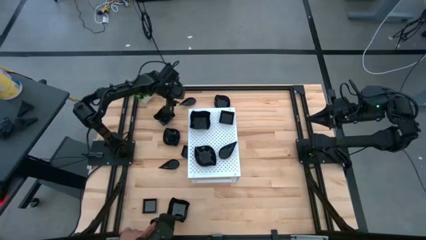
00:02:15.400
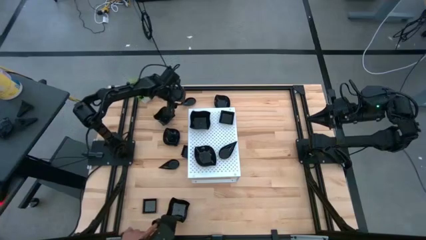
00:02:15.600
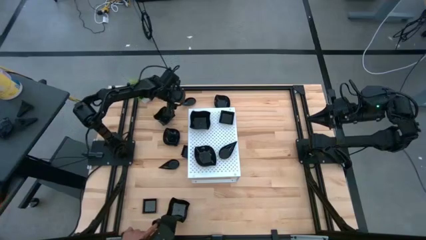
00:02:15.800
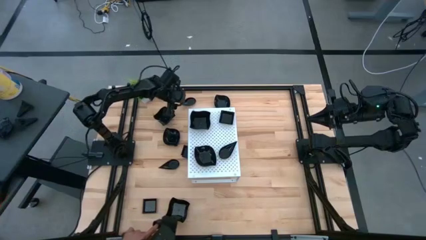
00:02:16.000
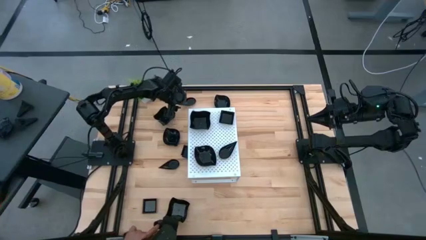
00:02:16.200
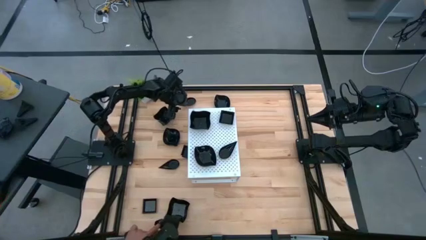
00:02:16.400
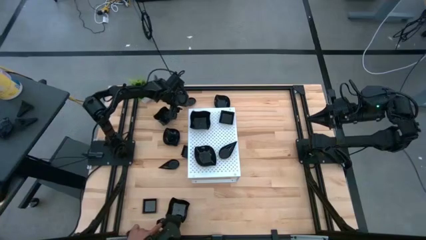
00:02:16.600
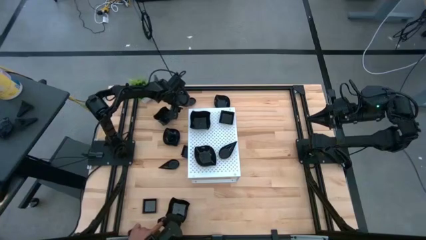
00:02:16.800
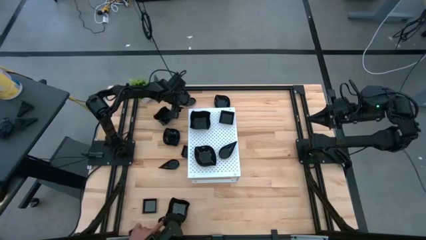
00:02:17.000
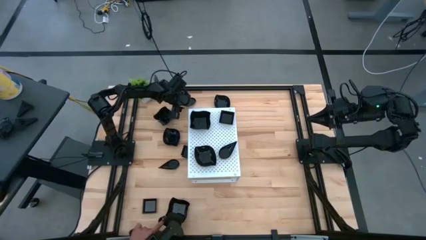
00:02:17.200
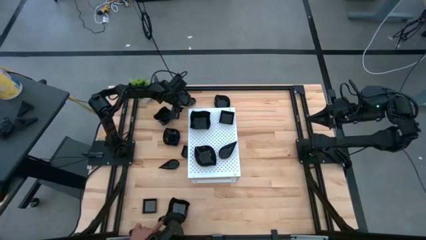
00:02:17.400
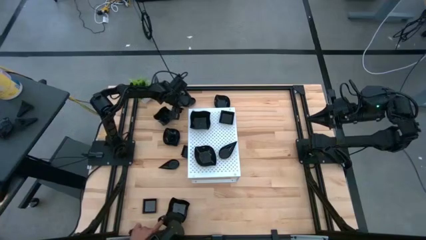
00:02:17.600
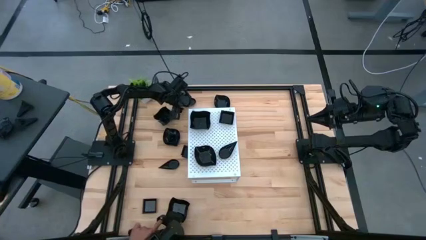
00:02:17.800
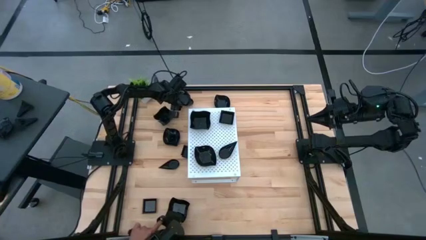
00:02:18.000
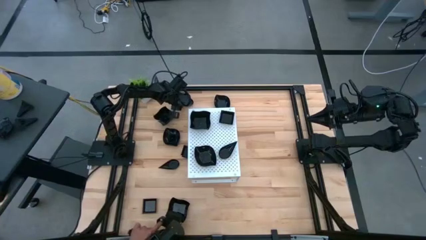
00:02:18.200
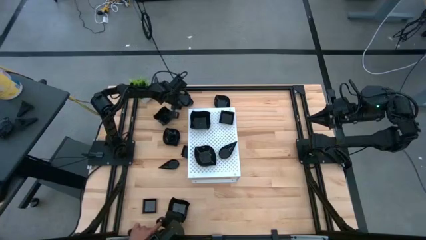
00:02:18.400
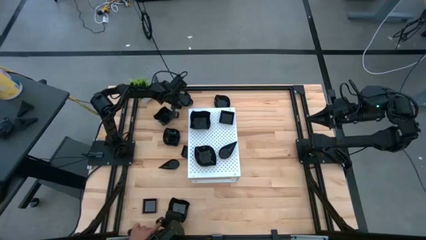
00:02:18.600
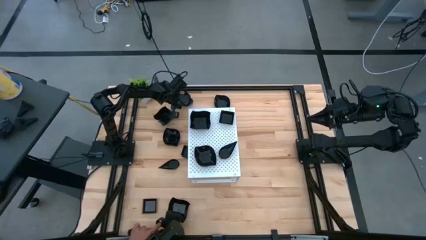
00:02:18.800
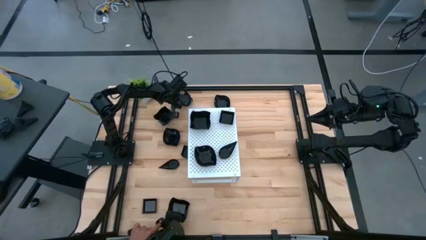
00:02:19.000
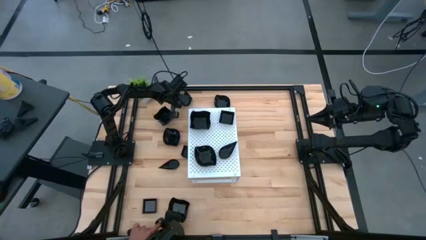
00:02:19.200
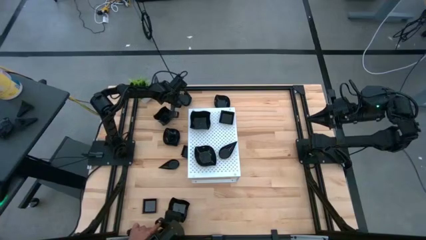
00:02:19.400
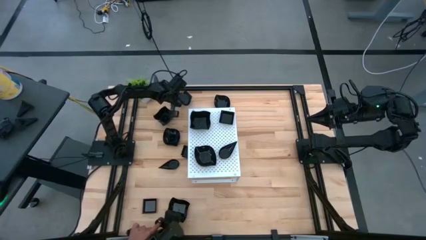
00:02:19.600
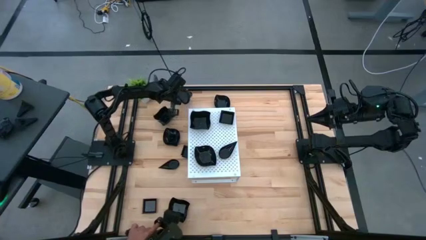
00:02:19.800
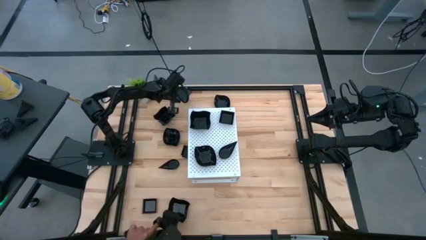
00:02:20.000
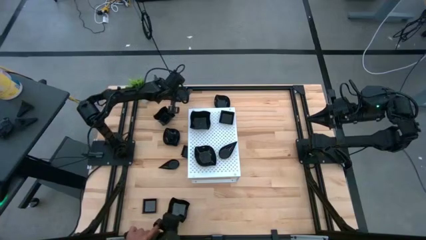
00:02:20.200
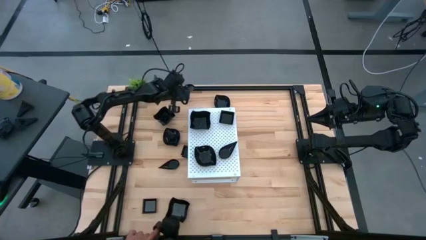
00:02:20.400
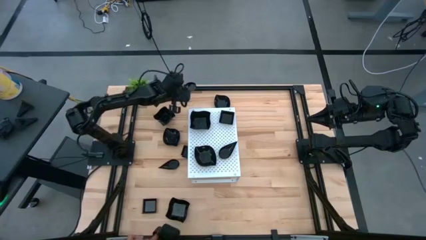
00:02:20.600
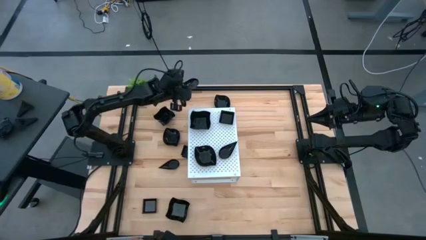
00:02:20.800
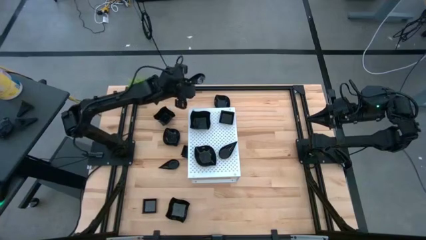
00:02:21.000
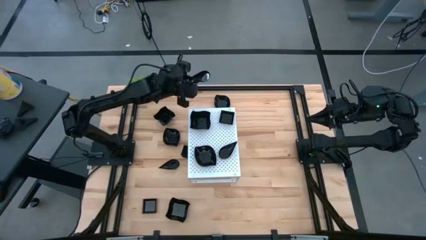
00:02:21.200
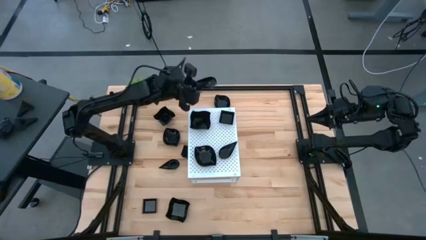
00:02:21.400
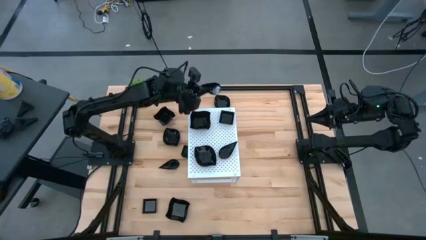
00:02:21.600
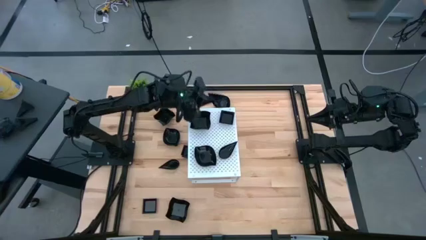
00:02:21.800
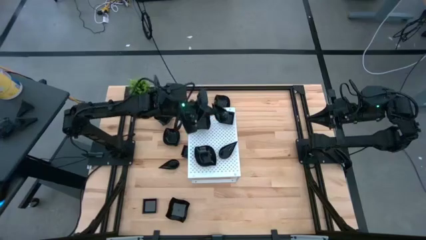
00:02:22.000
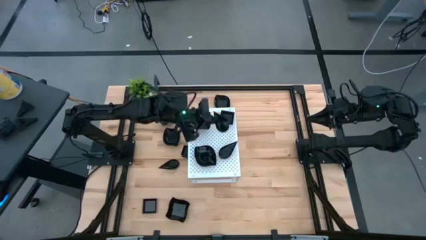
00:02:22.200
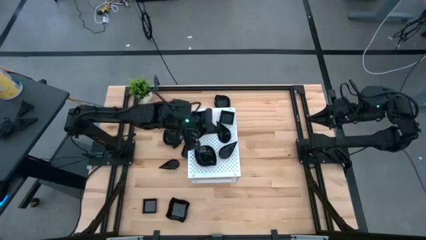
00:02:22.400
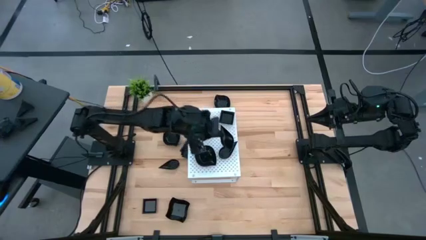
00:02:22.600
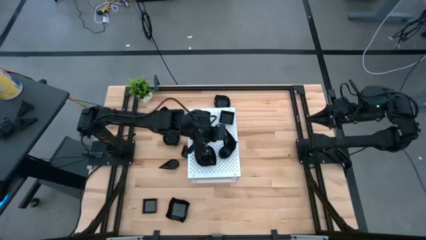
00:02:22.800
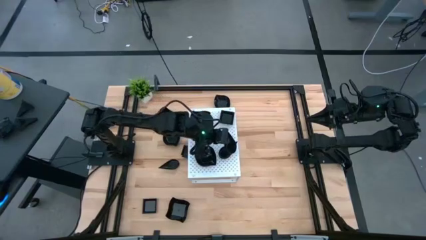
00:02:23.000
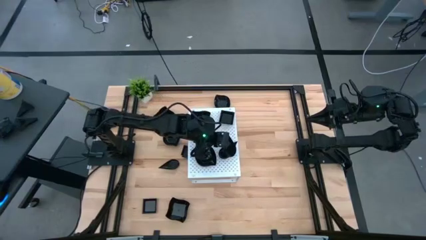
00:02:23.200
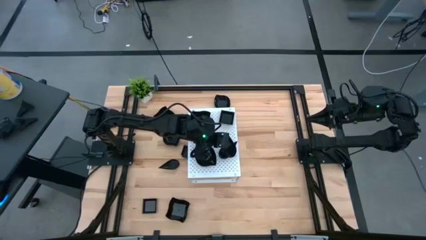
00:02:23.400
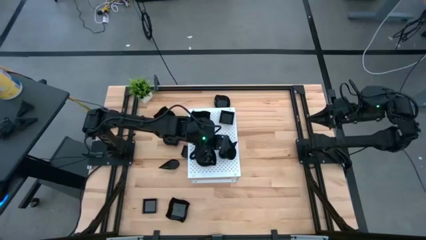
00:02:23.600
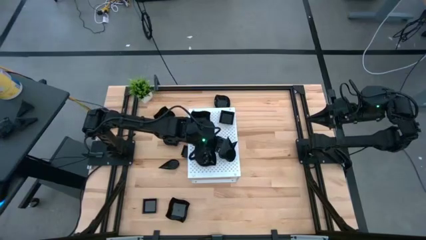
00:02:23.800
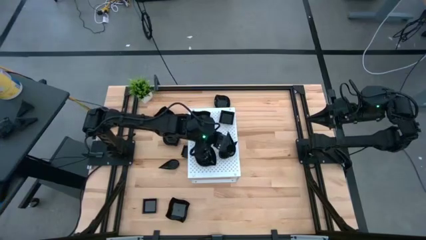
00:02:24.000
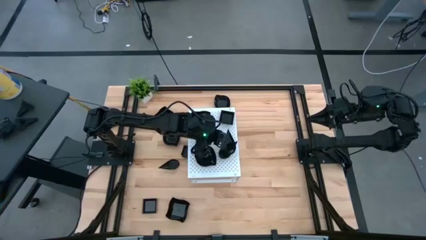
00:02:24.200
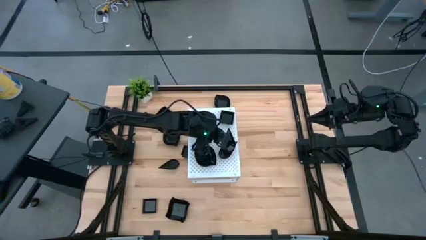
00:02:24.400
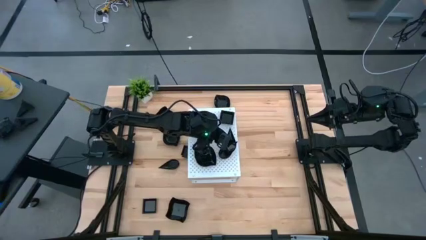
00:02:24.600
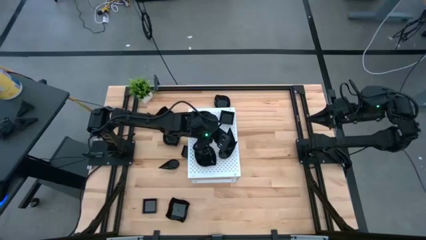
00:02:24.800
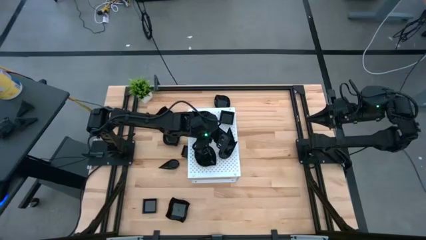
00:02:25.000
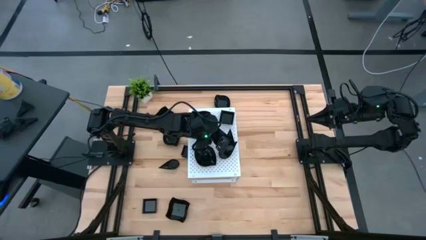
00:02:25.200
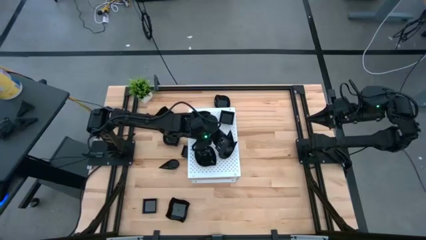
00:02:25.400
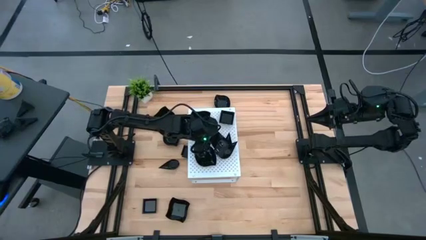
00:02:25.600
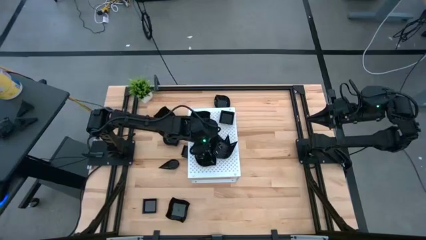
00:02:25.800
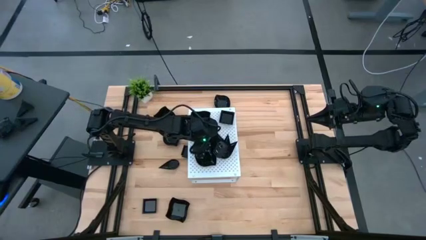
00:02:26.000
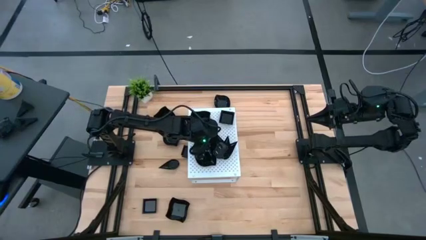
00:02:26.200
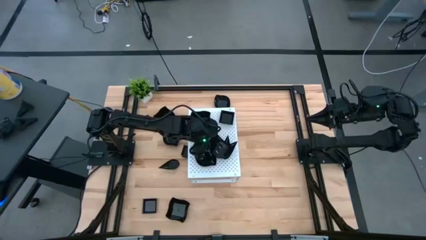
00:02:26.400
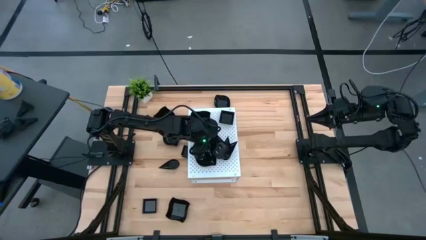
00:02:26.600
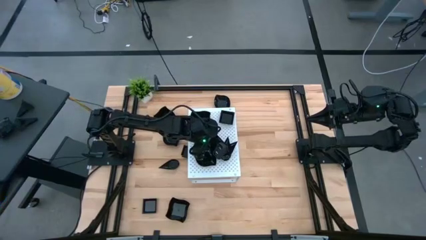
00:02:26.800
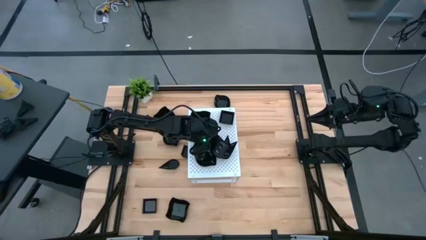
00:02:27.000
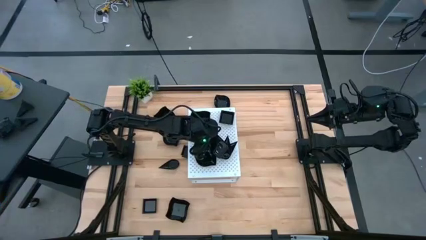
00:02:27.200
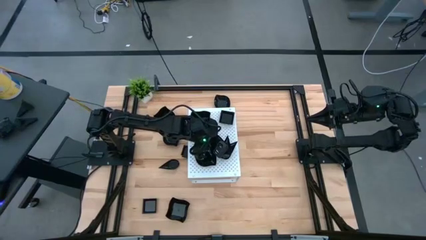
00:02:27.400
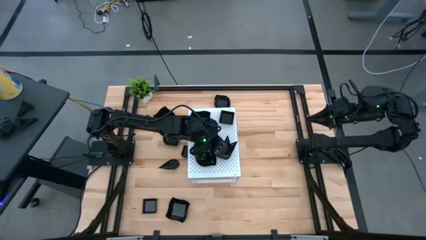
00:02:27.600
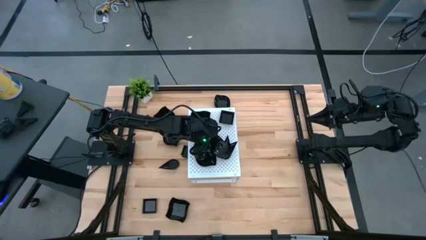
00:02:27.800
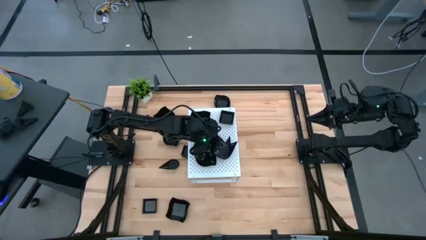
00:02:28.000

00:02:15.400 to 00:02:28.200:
Task: Pick & Place Mini shaped plates
Stack the black drop shaped plate on top of the other black drop shaped plate on the shelf
